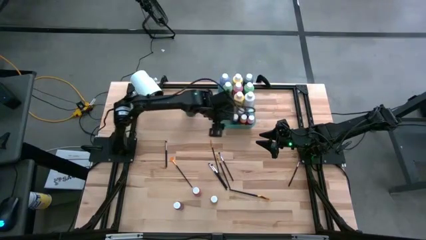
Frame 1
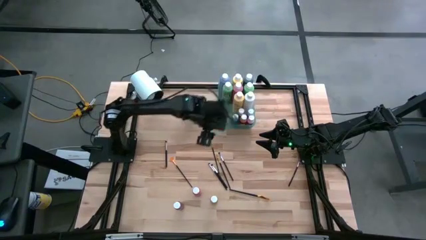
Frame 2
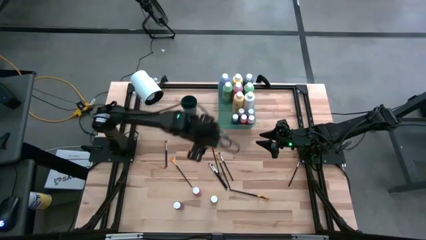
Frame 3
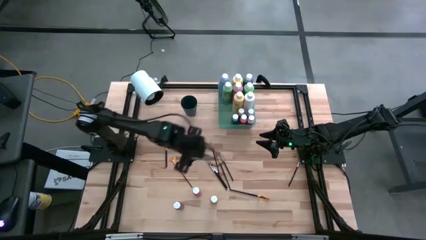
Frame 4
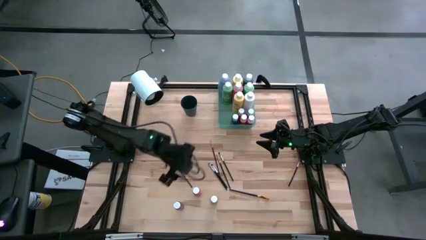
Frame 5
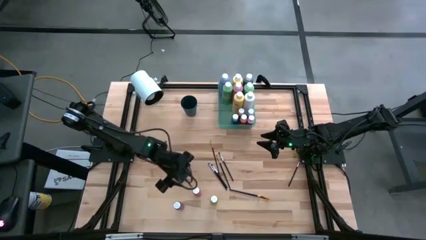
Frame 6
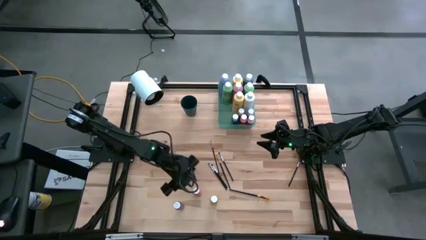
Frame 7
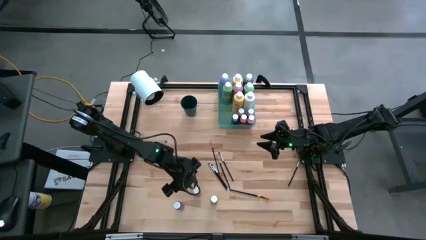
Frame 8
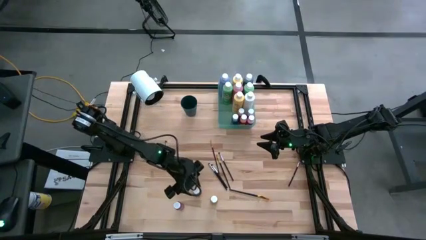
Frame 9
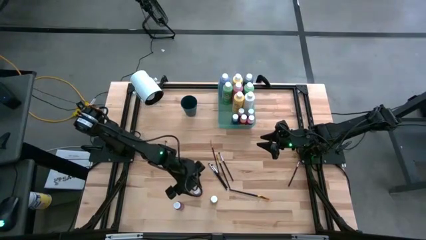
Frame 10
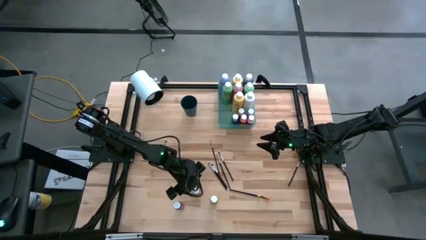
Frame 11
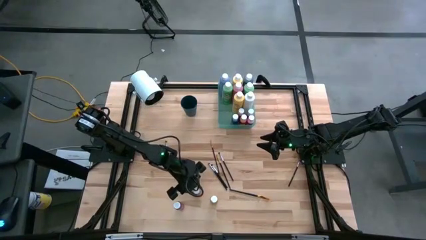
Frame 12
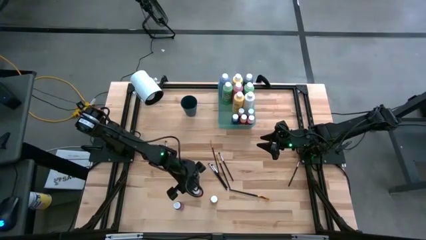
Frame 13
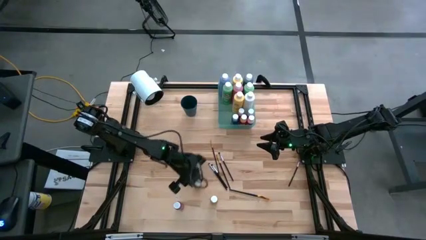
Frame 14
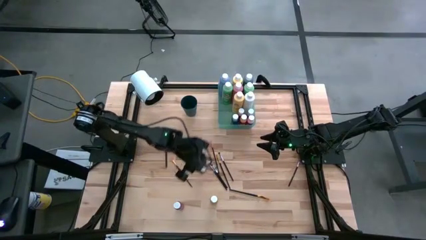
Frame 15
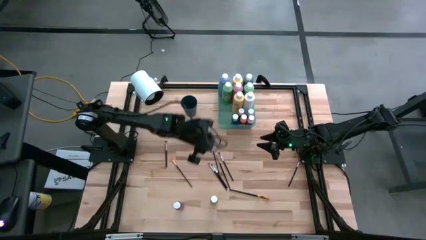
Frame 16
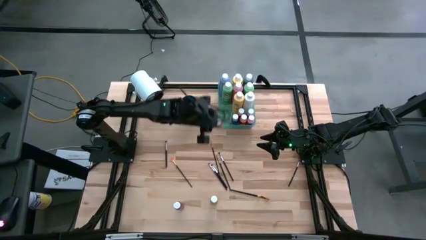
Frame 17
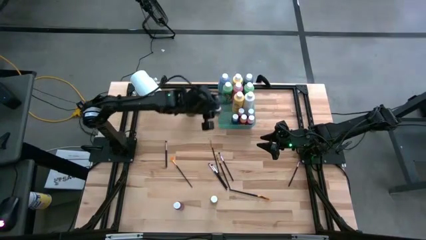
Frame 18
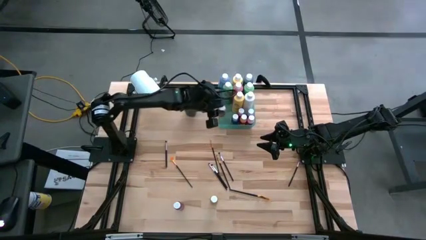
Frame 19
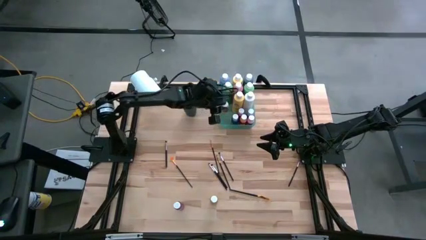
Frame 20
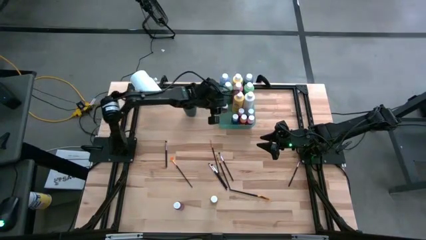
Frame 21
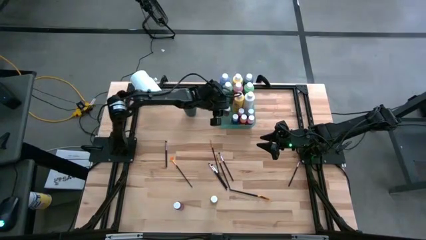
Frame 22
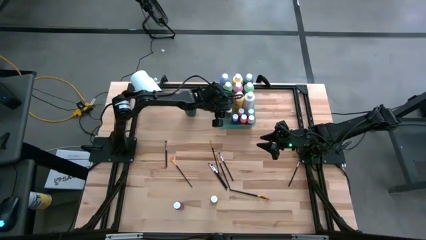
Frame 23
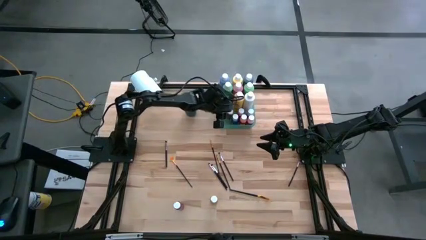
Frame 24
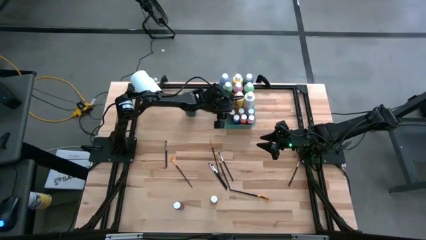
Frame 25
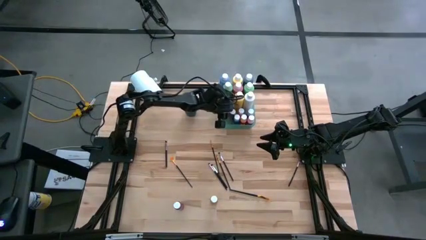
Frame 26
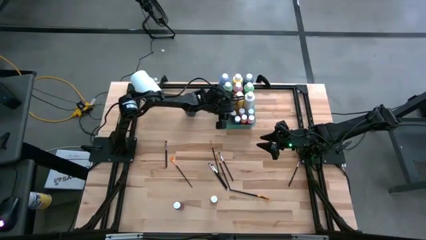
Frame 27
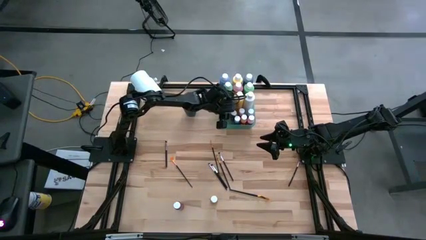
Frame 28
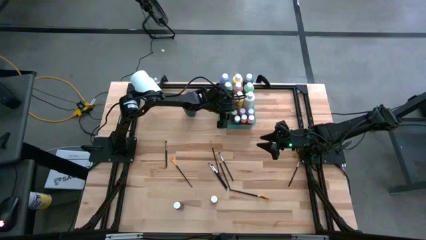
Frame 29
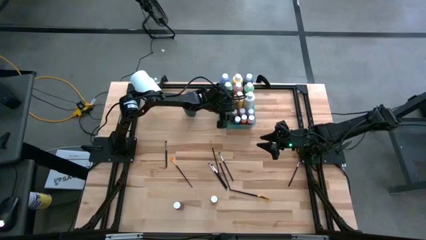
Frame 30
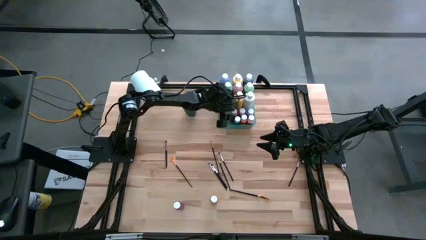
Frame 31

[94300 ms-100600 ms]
Task: Pick & Place Paint Supplies
Put the orange small paint bottle into the green bin

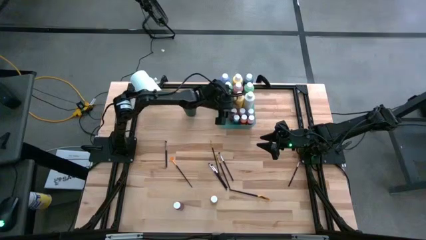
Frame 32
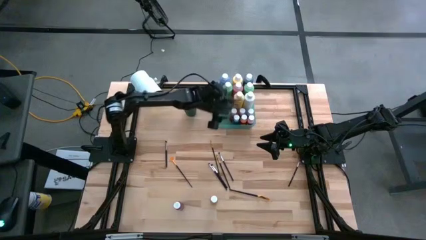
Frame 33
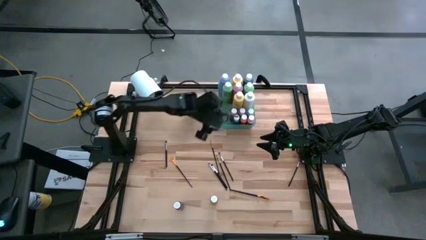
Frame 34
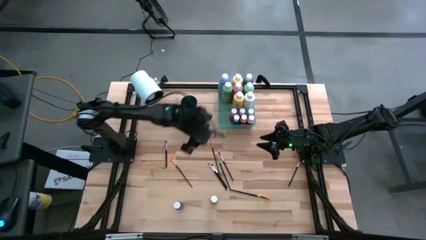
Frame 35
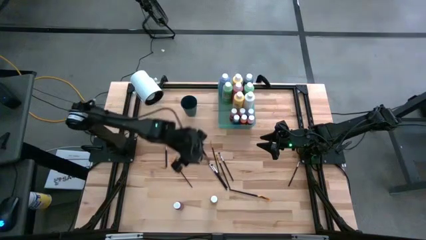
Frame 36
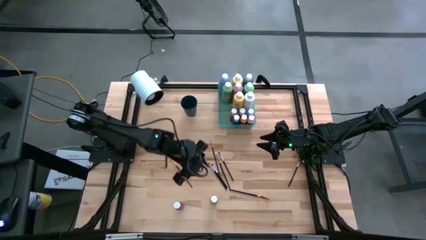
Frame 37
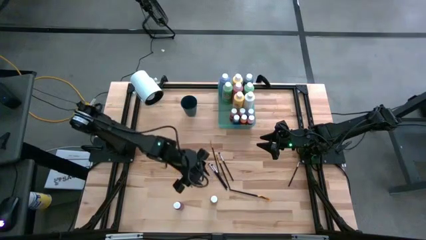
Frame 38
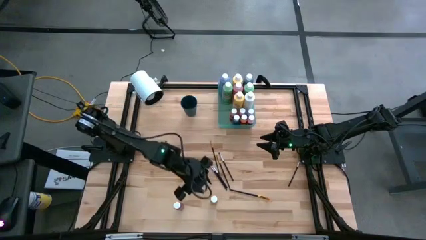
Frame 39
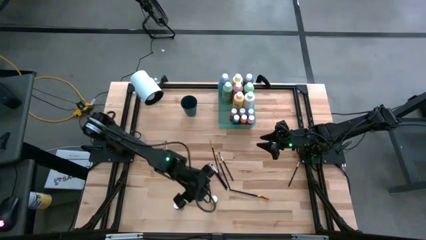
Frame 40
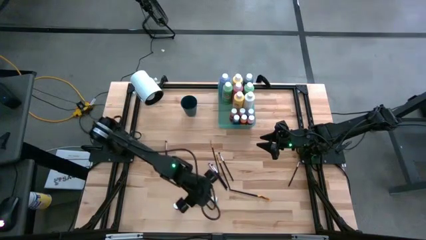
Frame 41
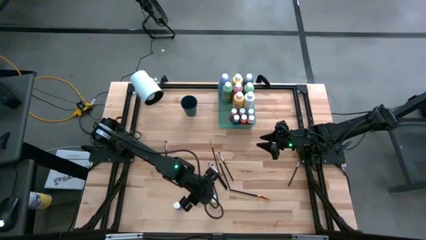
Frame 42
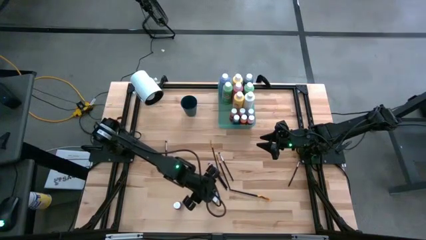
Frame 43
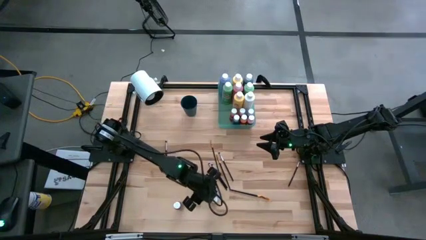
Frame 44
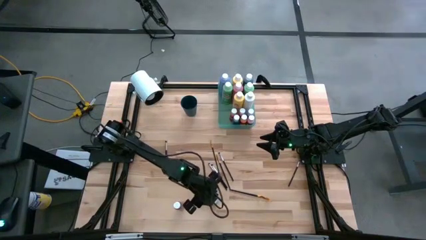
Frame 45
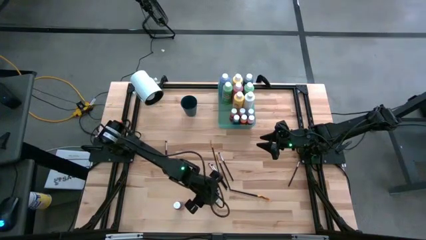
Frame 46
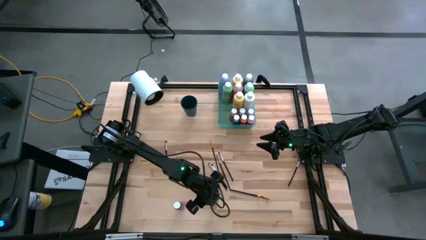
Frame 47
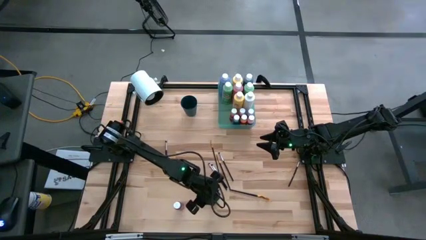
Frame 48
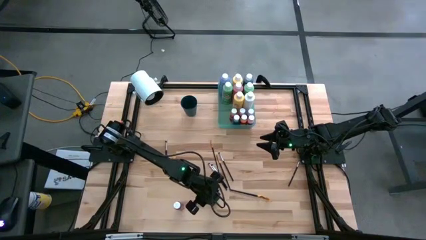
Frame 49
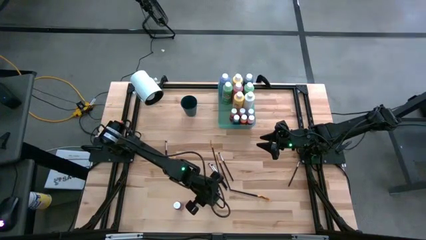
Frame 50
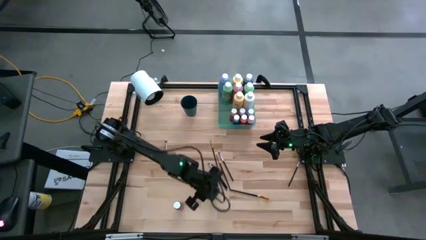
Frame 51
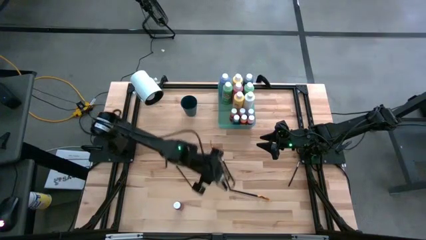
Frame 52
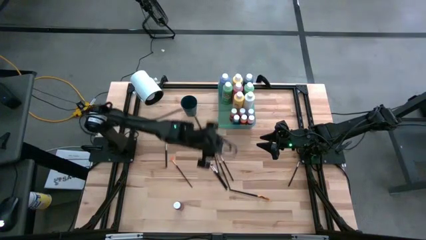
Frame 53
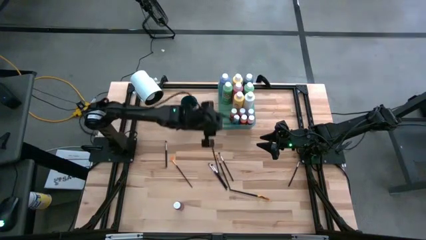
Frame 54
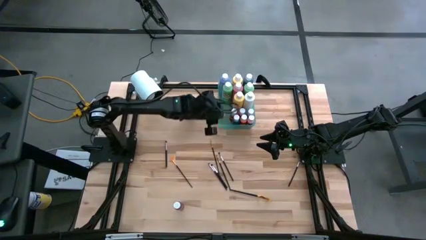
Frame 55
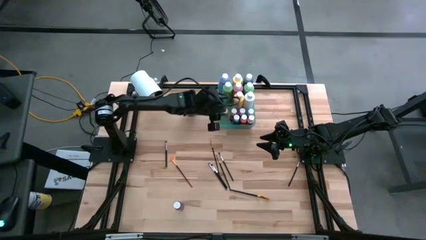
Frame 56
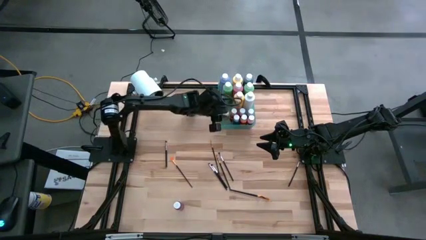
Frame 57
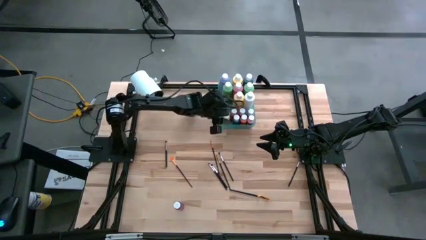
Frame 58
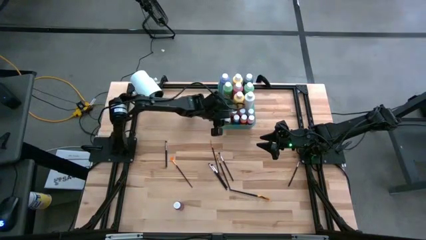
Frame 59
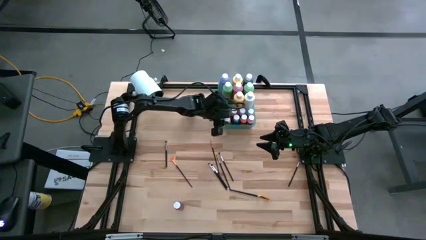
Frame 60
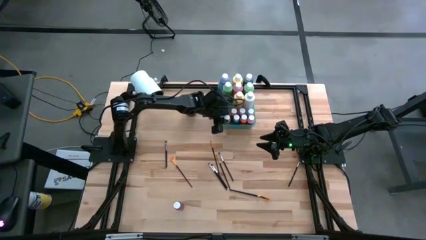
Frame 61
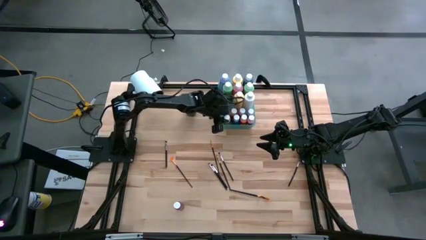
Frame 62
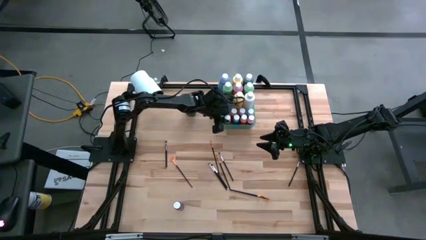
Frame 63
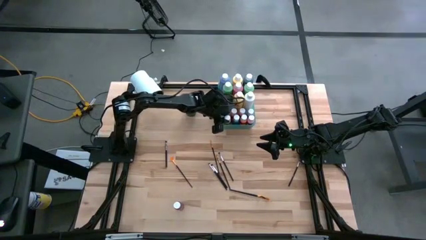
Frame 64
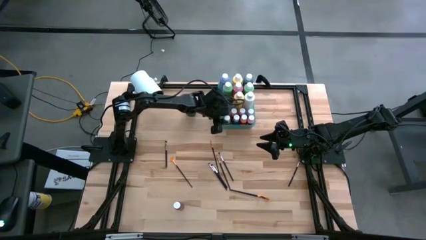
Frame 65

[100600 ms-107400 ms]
Put the yellow small paint bottle into the green bin

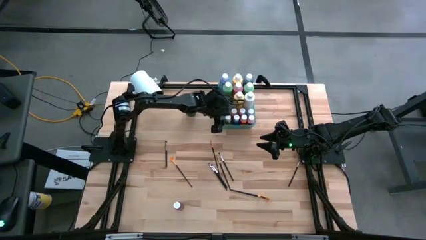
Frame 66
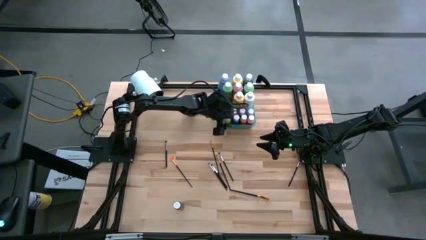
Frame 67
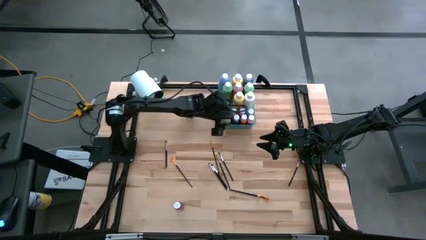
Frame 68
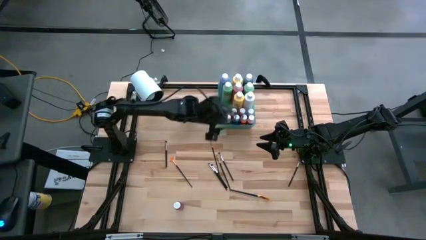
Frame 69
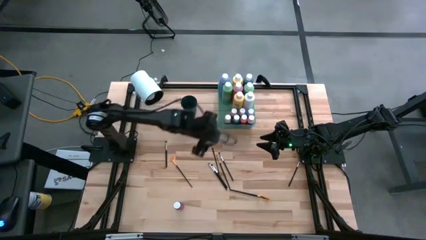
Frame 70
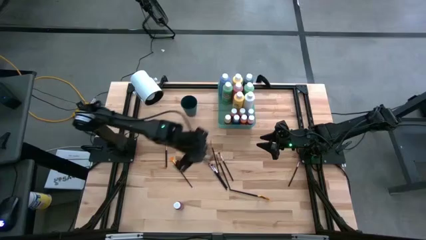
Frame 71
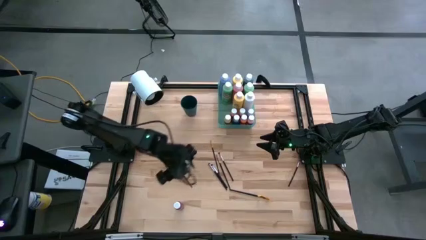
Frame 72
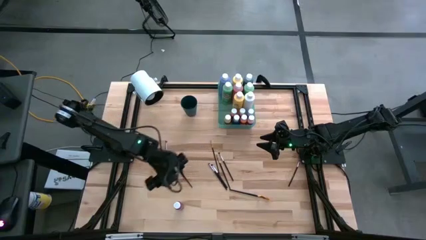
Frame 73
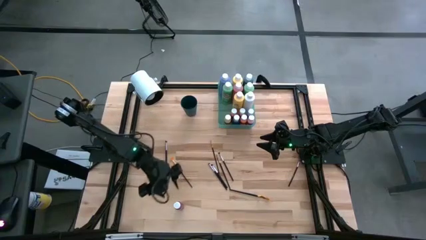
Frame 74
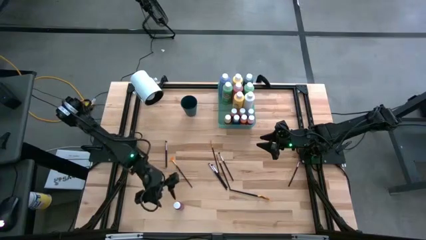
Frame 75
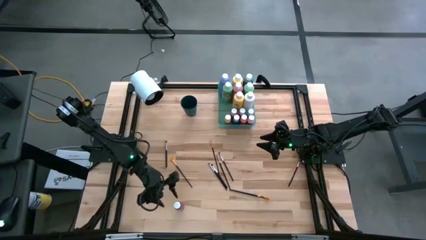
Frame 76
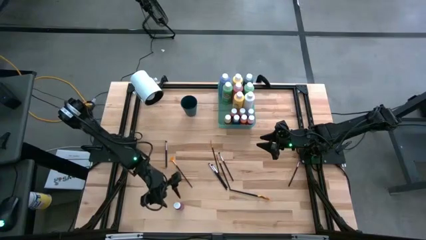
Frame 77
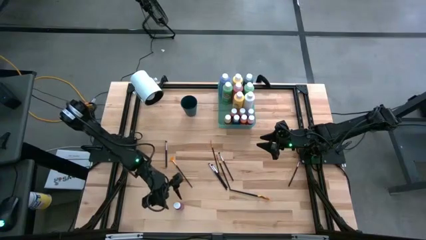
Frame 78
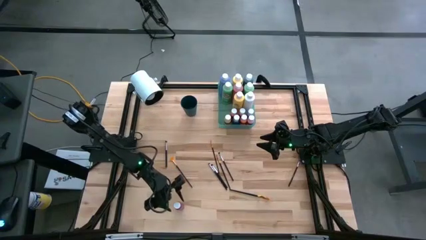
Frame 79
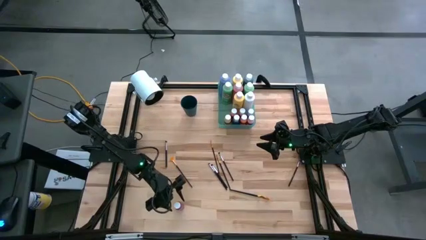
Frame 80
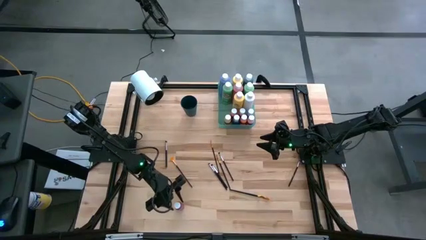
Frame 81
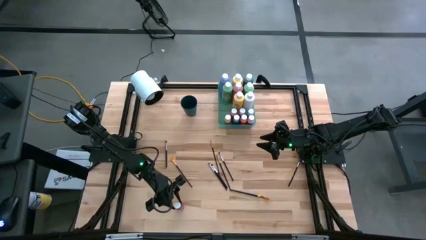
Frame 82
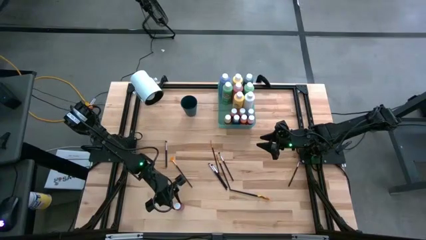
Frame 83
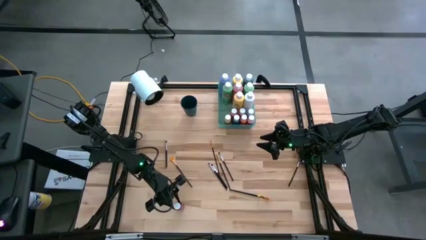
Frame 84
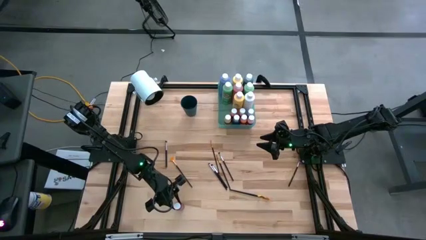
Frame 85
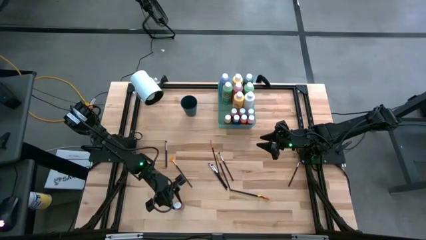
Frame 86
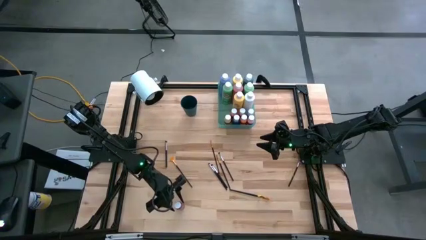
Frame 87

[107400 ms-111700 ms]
Put the pink small paint bottle into the green bin
